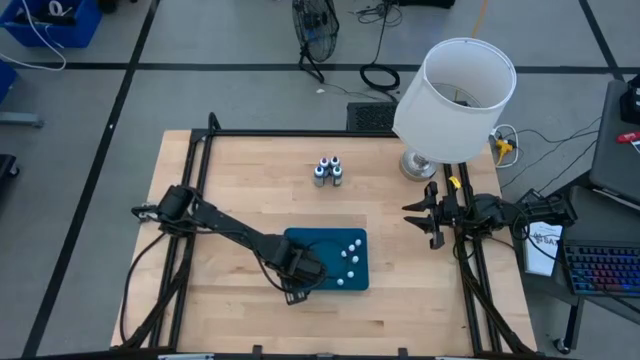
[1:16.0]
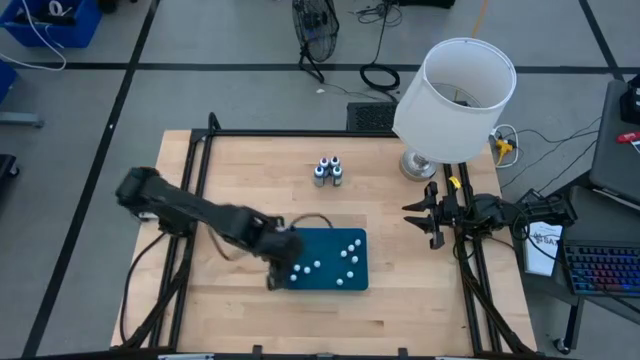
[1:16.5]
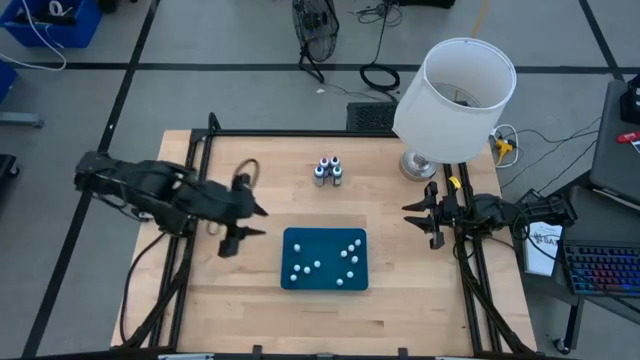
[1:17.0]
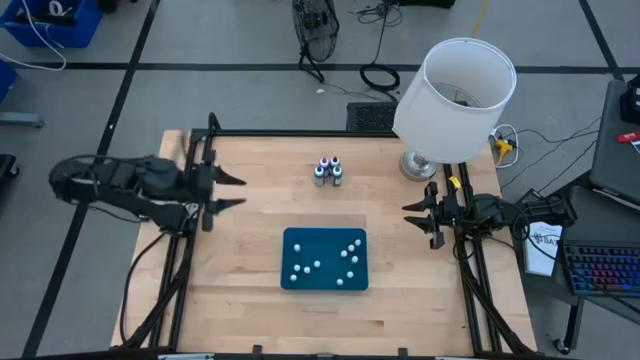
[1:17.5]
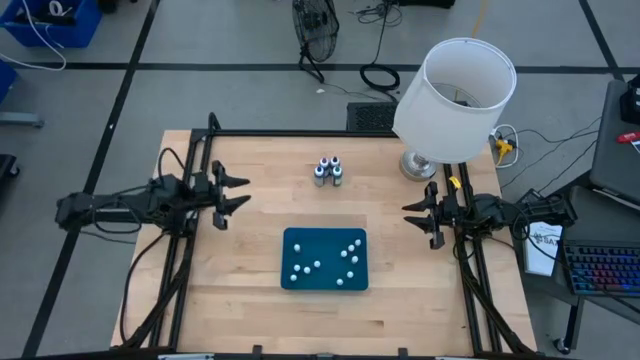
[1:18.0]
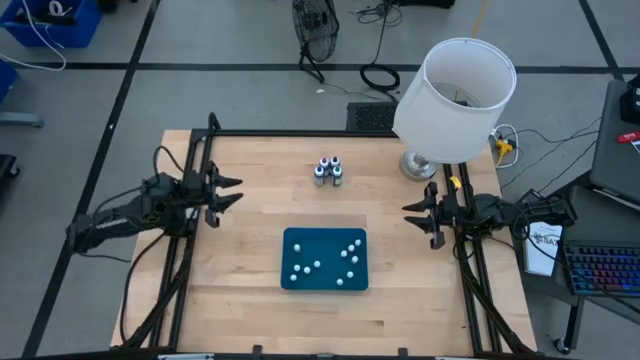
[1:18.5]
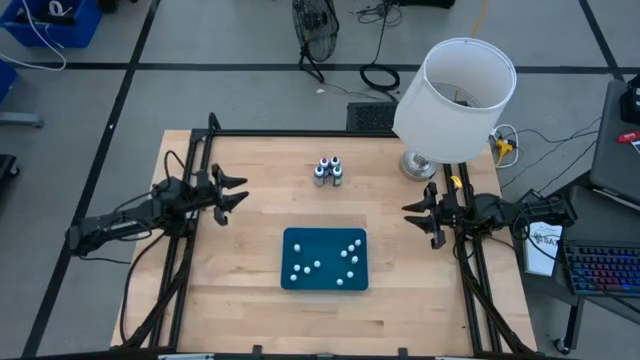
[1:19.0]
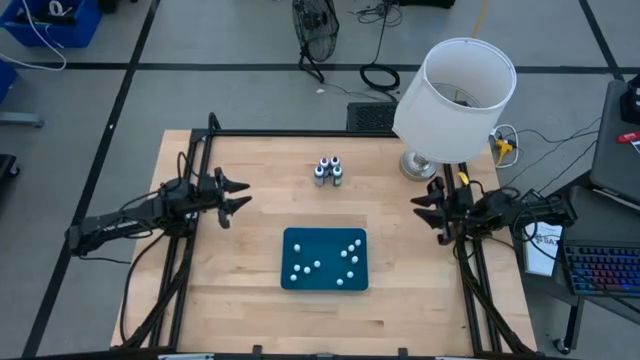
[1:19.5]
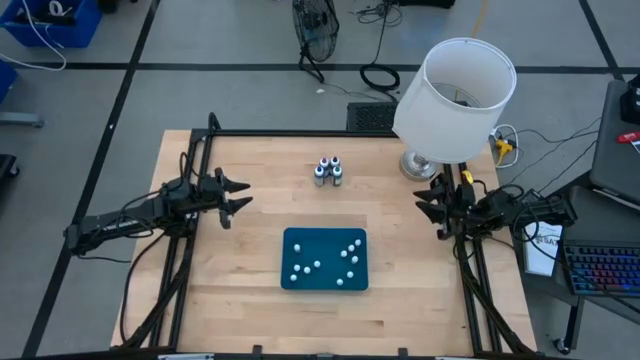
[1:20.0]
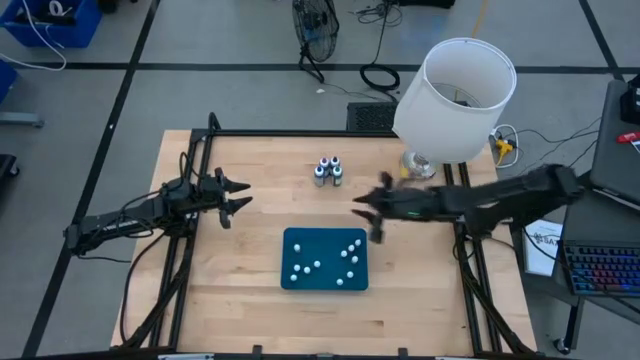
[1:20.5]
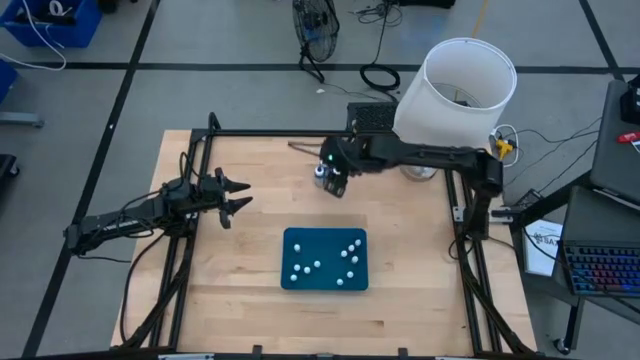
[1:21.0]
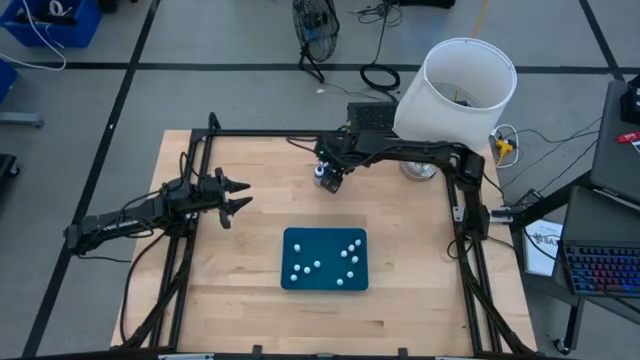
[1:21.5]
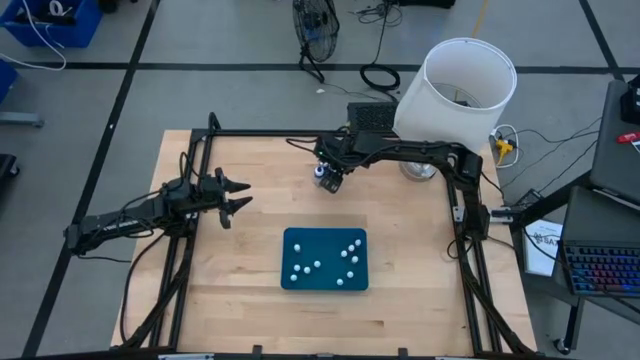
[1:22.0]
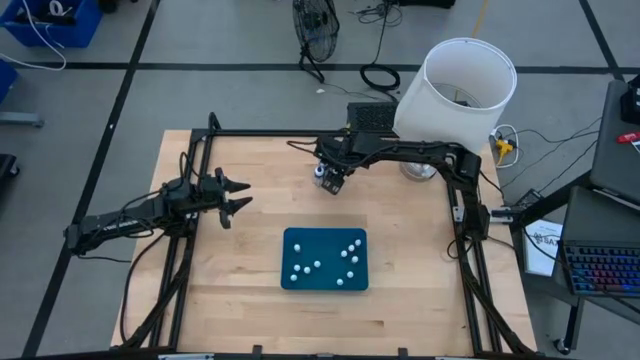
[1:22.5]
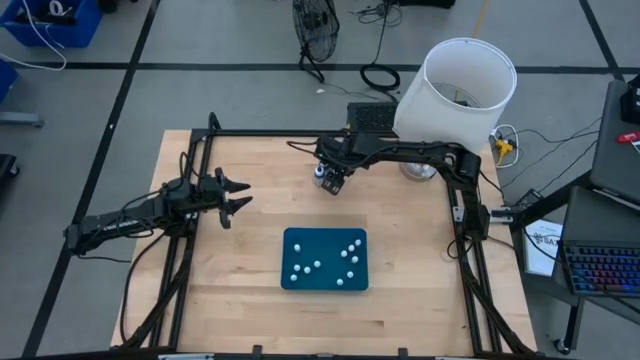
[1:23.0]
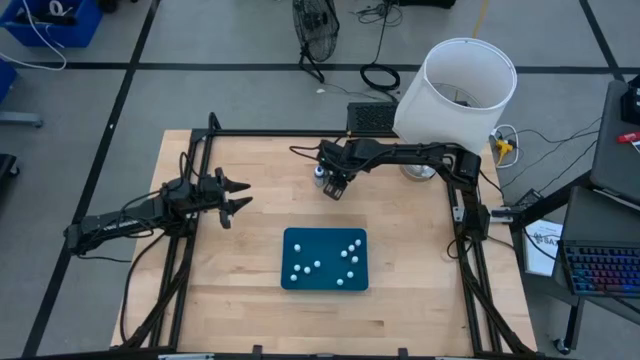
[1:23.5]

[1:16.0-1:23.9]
Task: Pick & Place food coloring
Put the green food coloring bottle into the bin

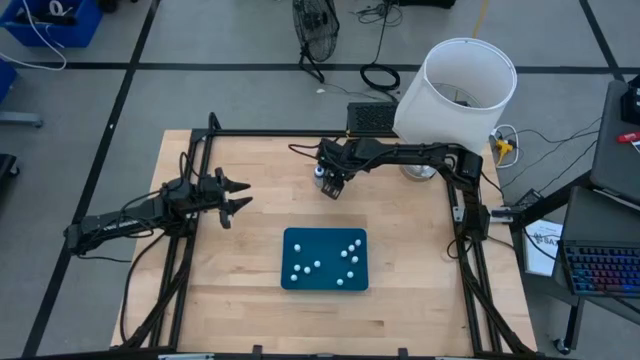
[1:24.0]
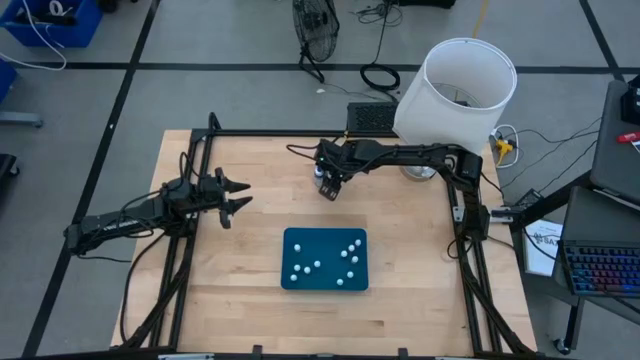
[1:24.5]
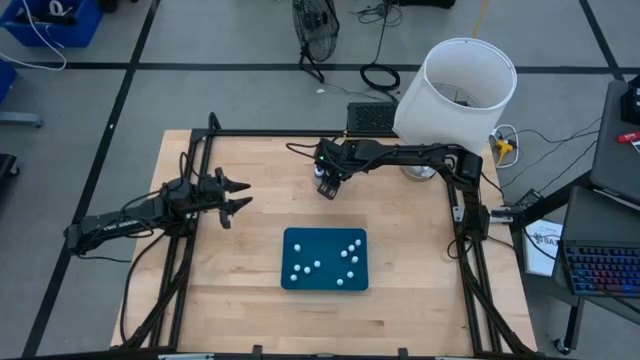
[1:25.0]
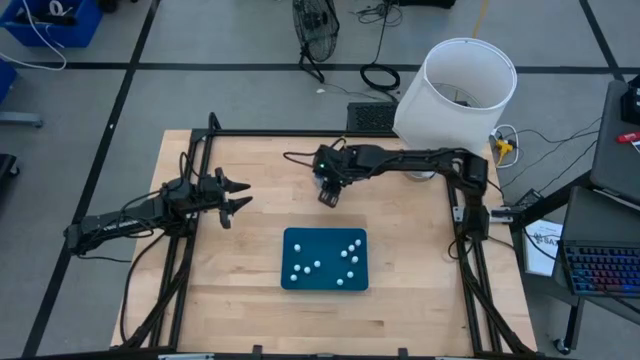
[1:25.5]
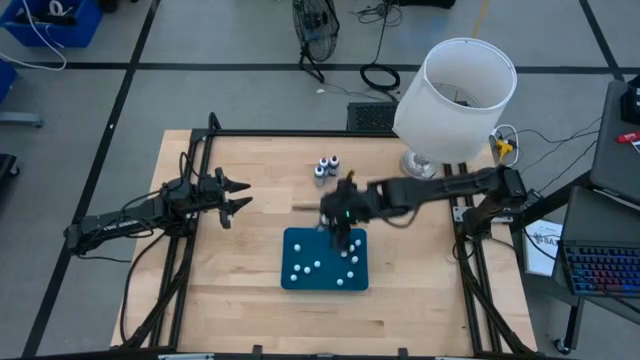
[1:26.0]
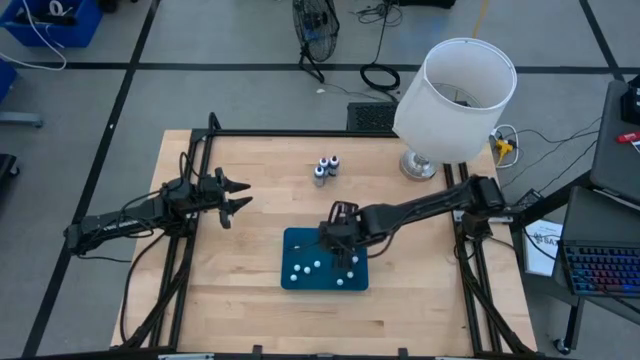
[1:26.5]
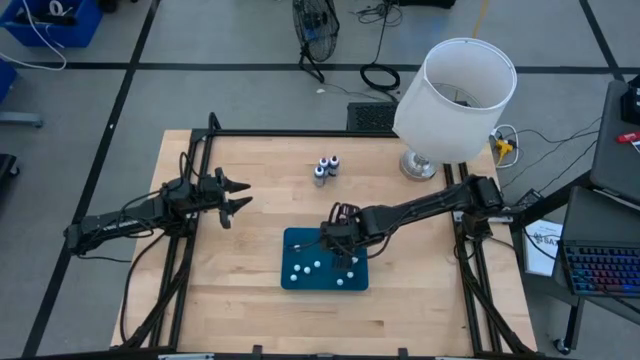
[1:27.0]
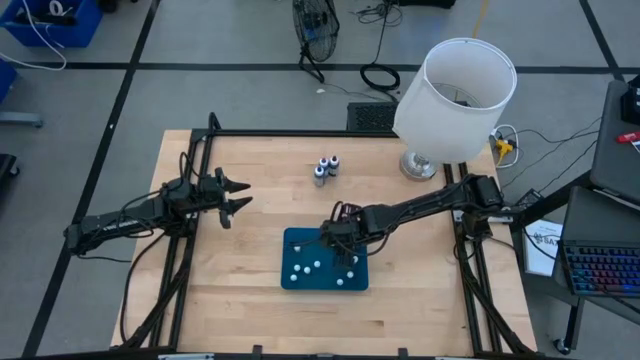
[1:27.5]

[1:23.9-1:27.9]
Put the green food coloring bottle into the bin

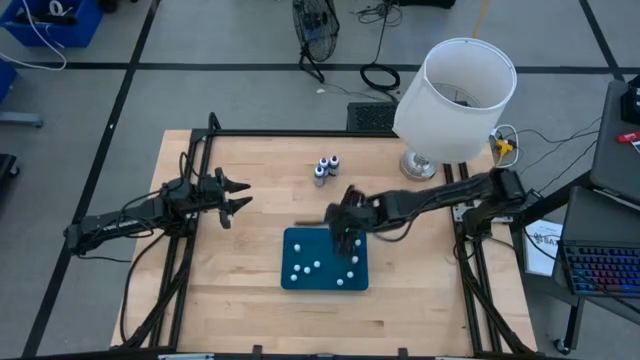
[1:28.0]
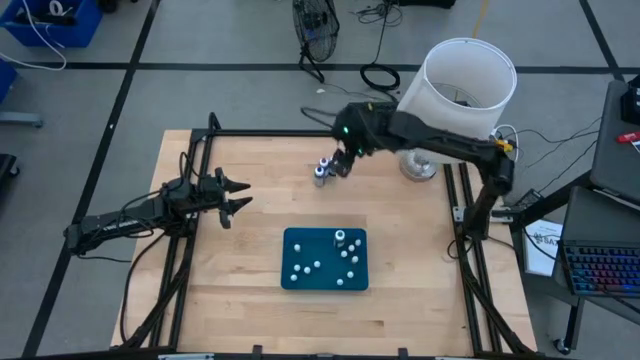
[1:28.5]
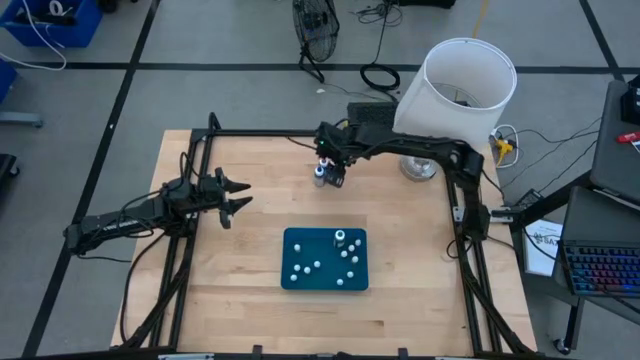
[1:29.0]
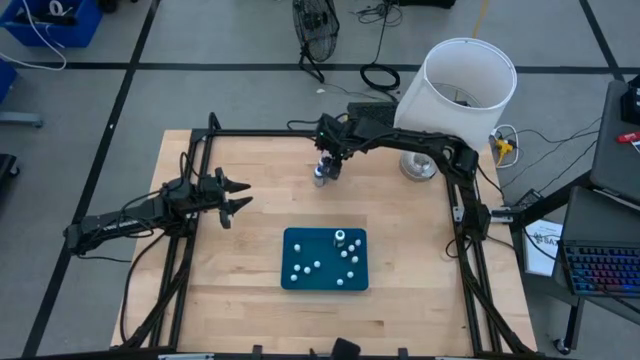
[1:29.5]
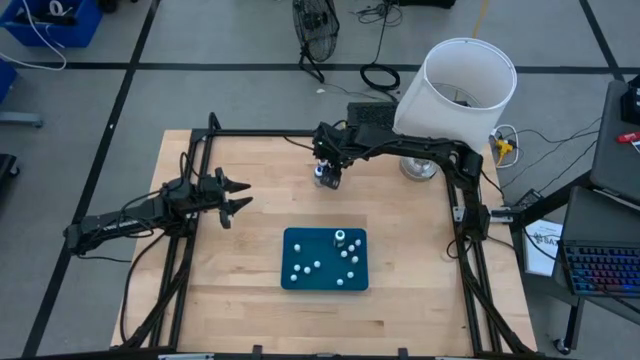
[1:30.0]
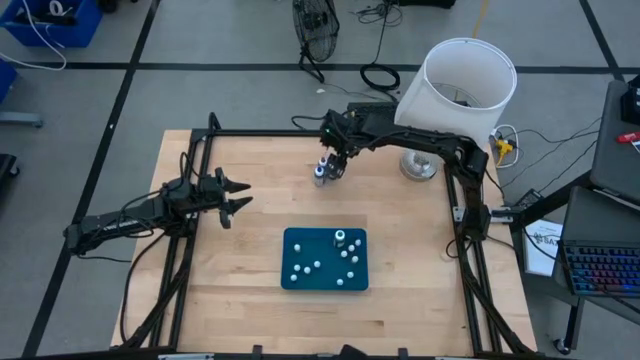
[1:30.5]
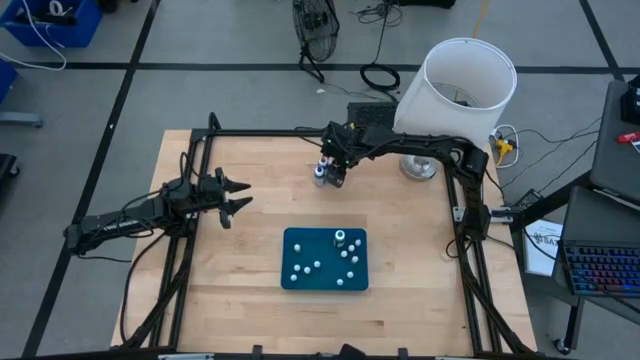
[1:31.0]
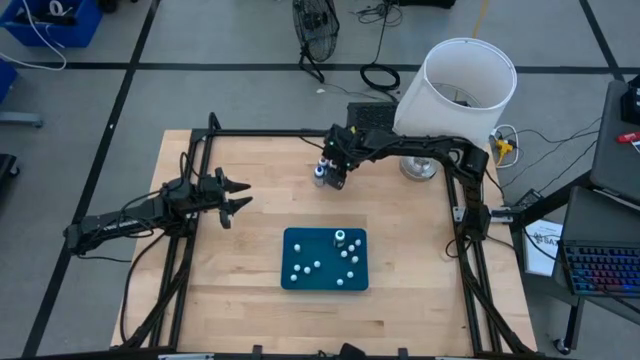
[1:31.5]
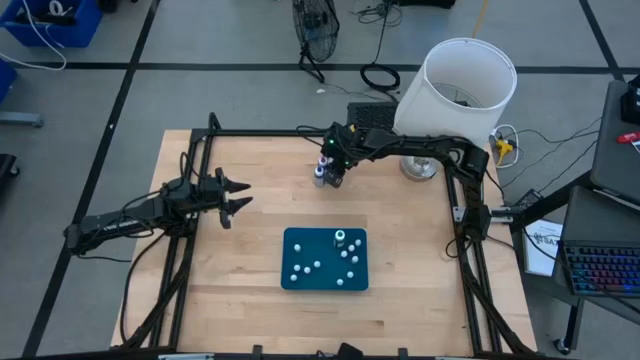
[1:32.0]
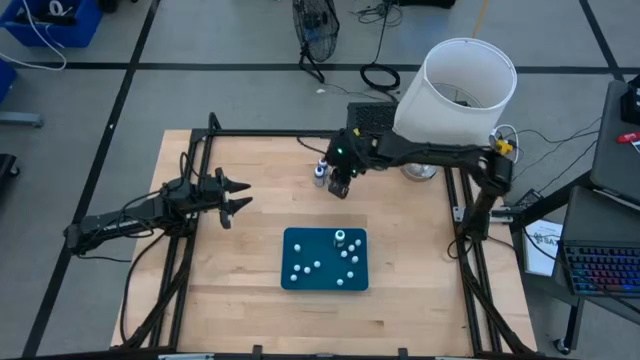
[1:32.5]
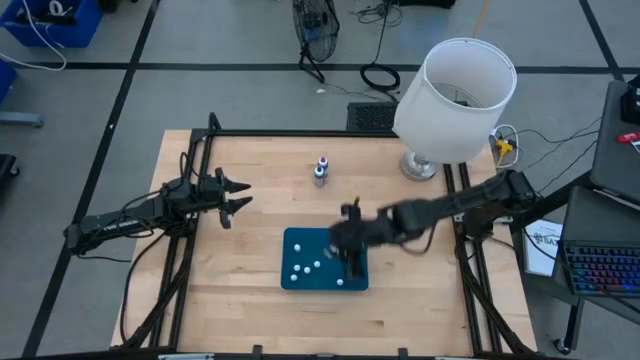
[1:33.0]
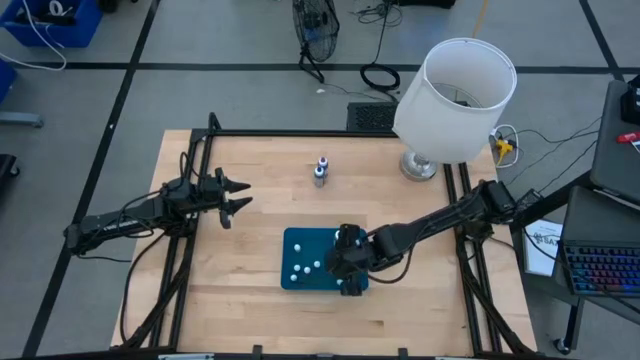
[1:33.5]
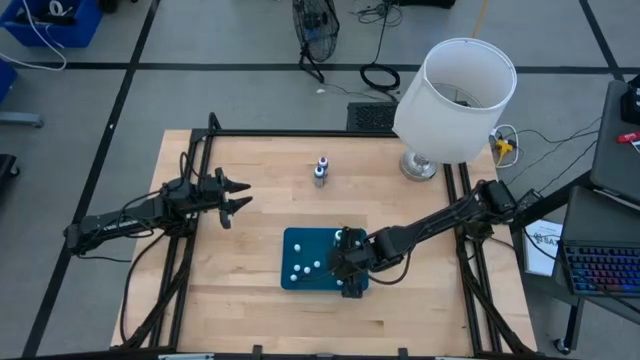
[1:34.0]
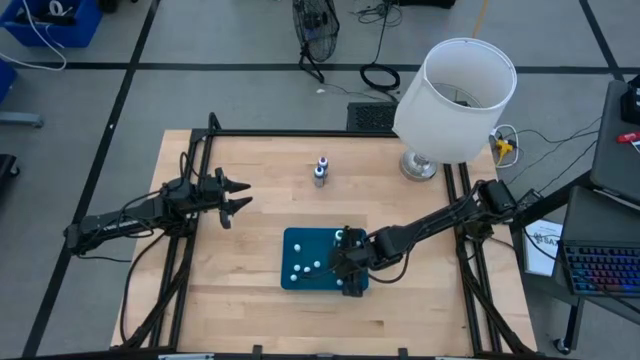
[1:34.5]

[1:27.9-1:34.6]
Put the black food coloring bottle into the bin

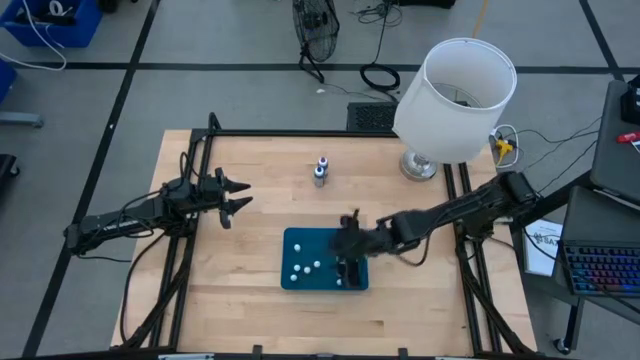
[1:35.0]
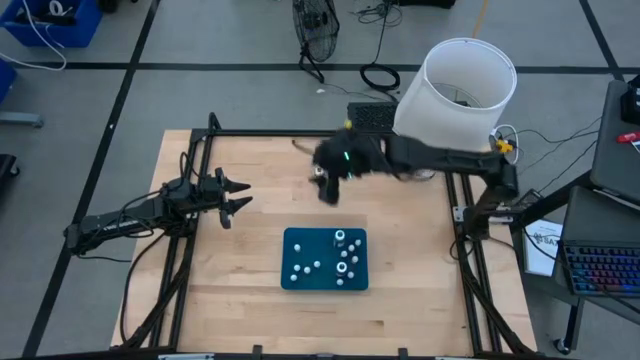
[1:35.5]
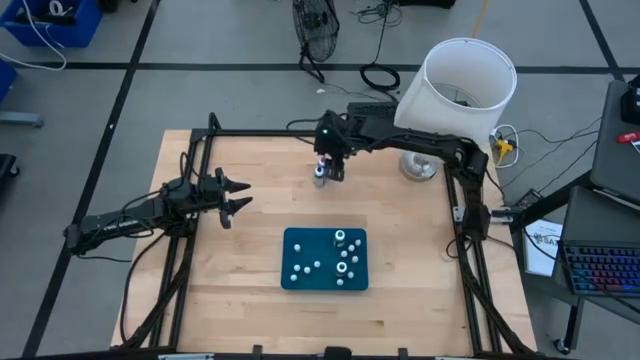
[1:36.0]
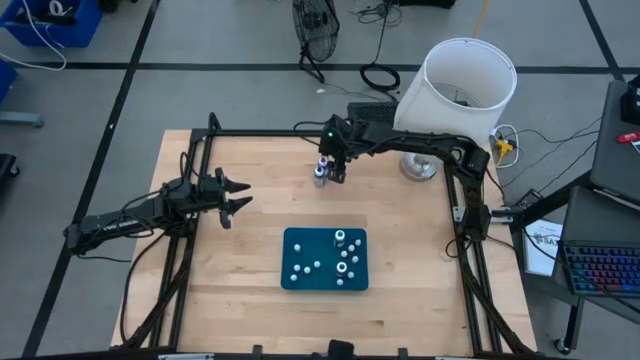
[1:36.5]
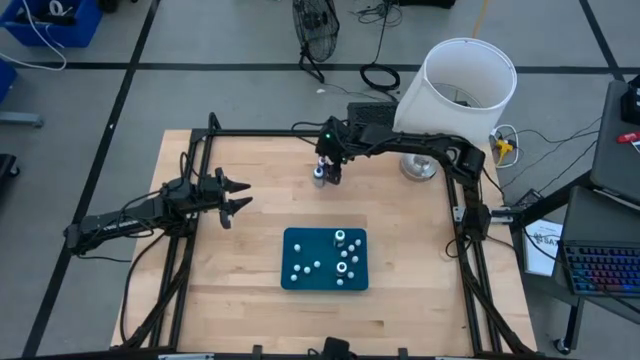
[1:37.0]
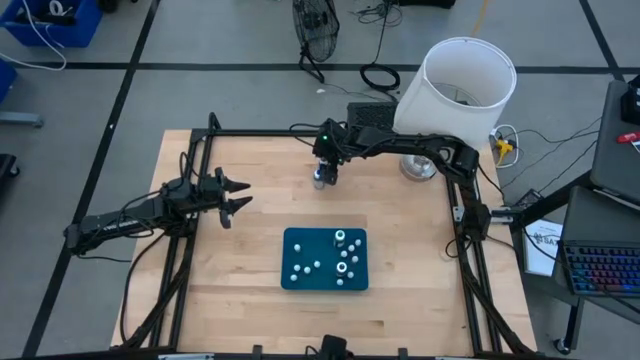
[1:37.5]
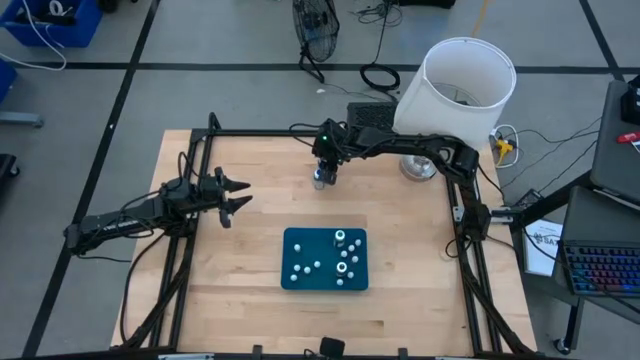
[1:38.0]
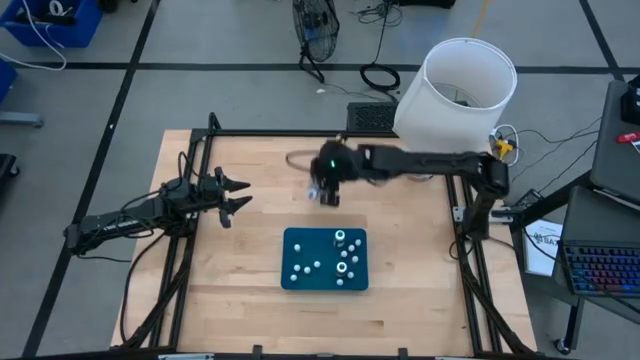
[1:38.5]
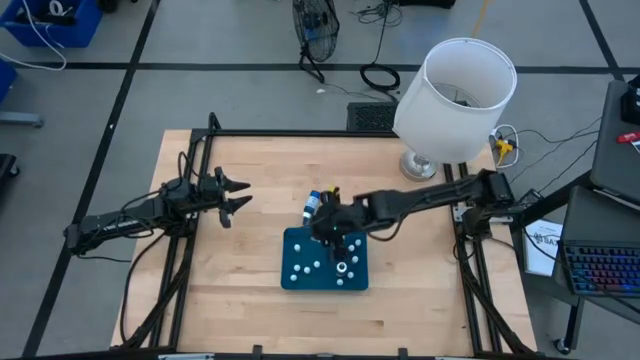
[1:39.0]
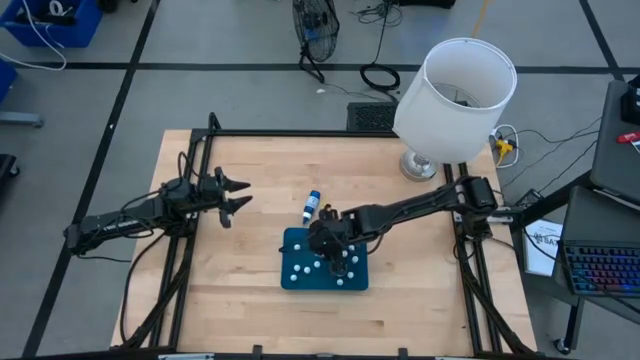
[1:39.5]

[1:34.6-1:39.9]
Put the purple food coloring bottle into the bin
